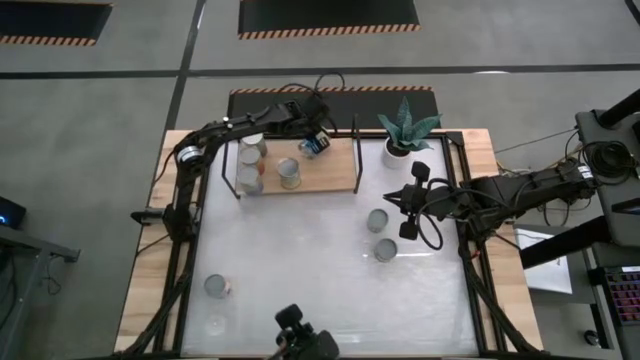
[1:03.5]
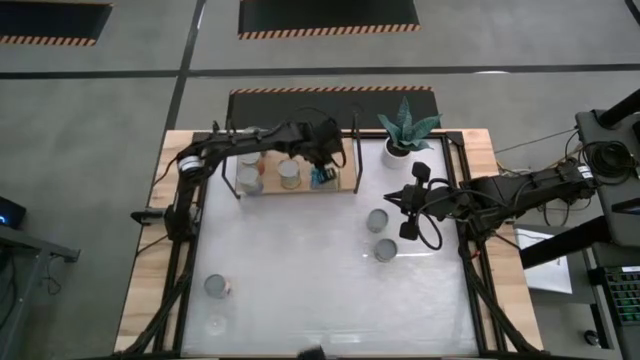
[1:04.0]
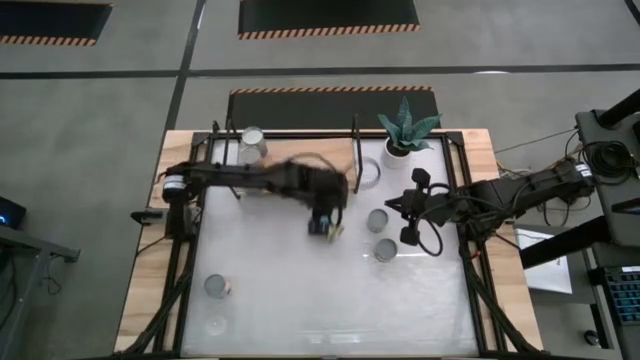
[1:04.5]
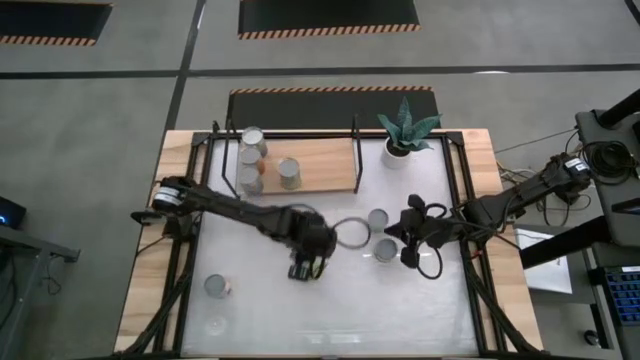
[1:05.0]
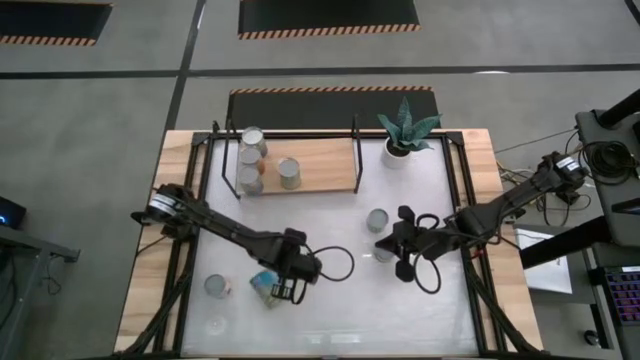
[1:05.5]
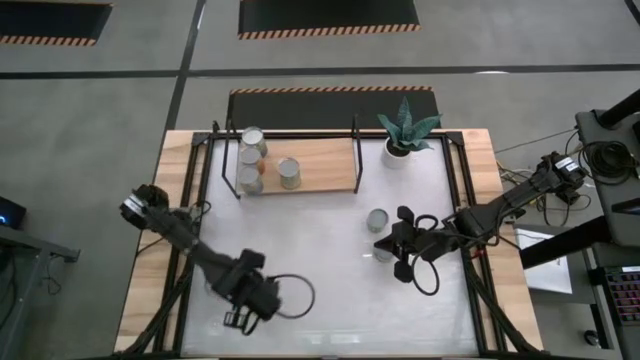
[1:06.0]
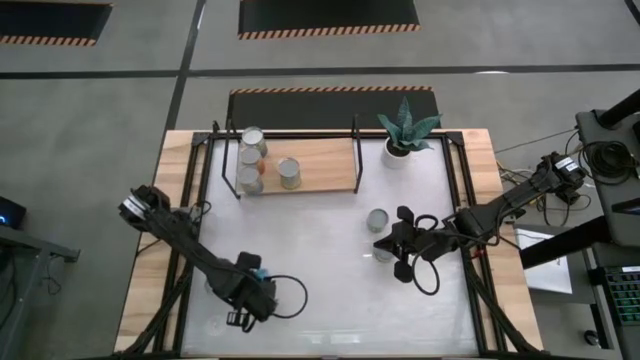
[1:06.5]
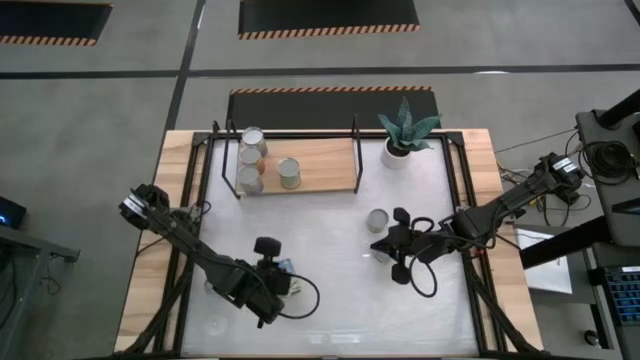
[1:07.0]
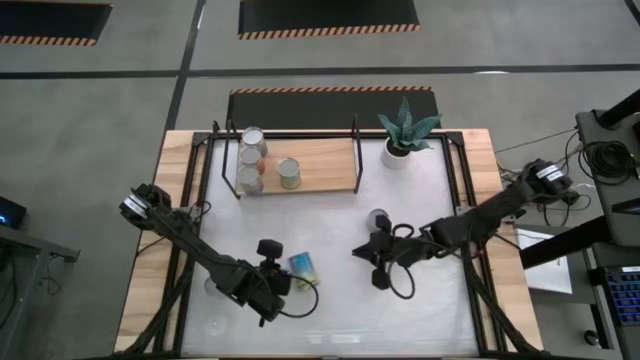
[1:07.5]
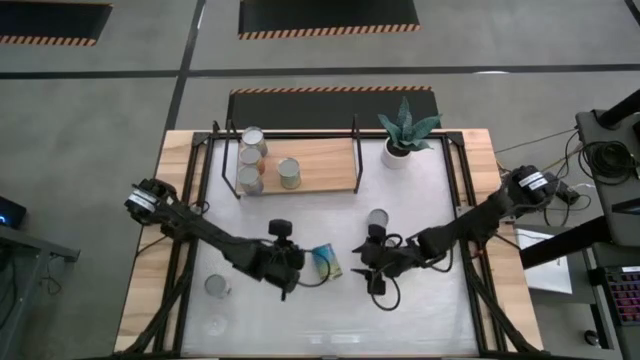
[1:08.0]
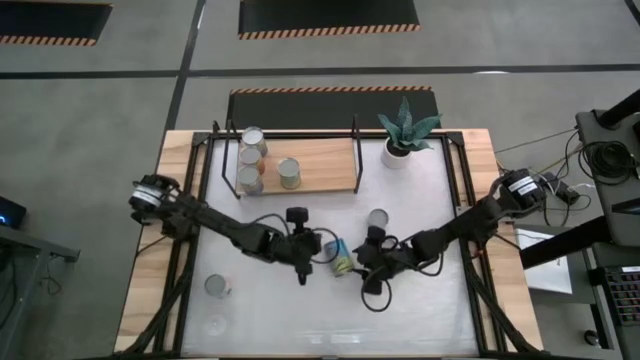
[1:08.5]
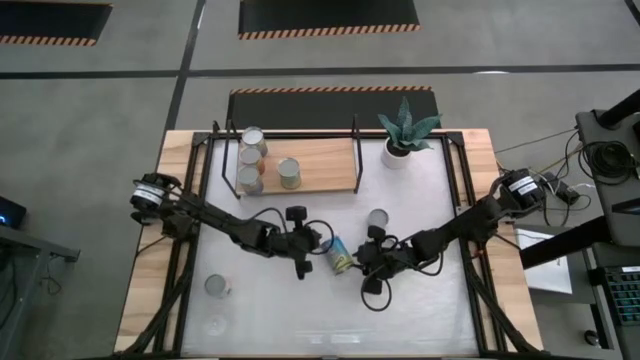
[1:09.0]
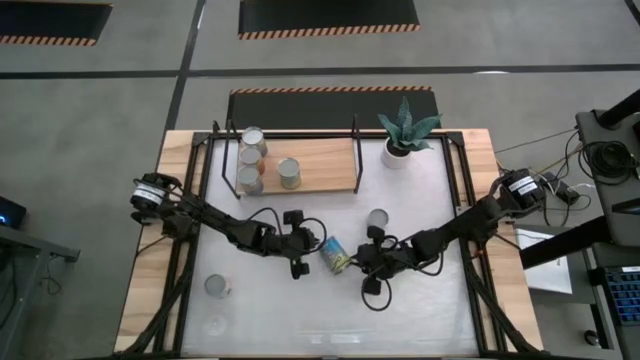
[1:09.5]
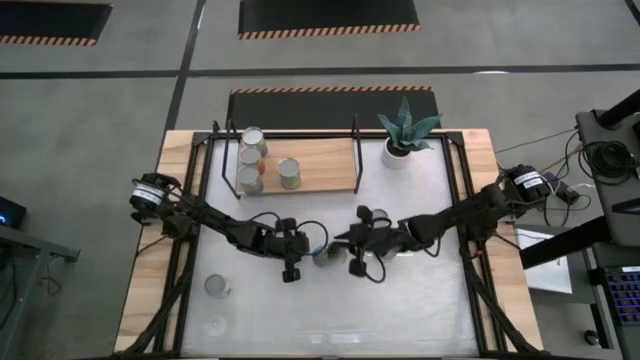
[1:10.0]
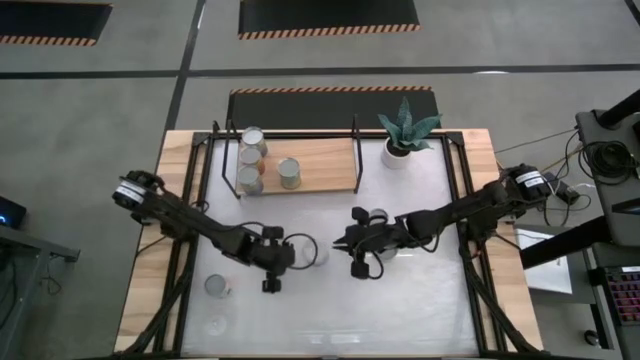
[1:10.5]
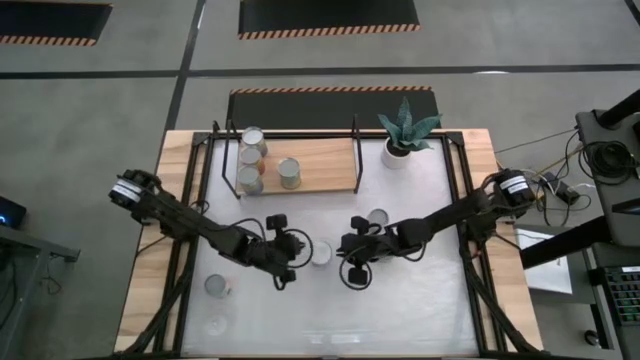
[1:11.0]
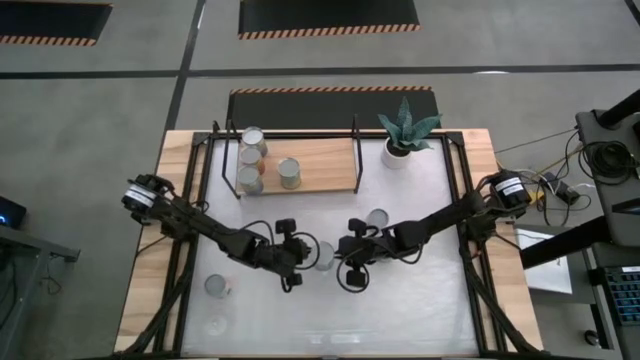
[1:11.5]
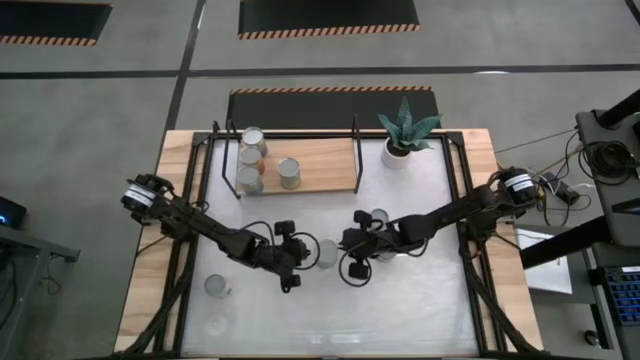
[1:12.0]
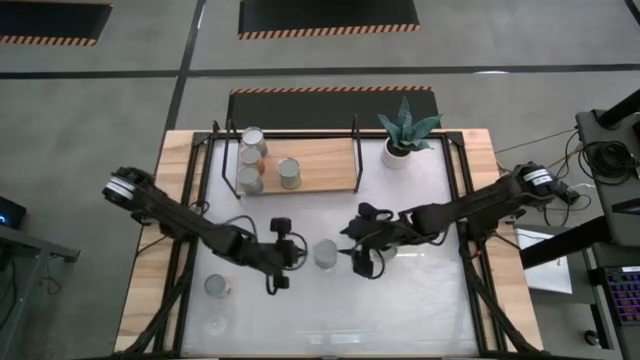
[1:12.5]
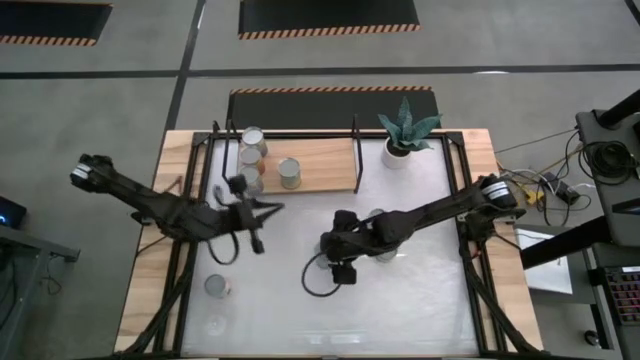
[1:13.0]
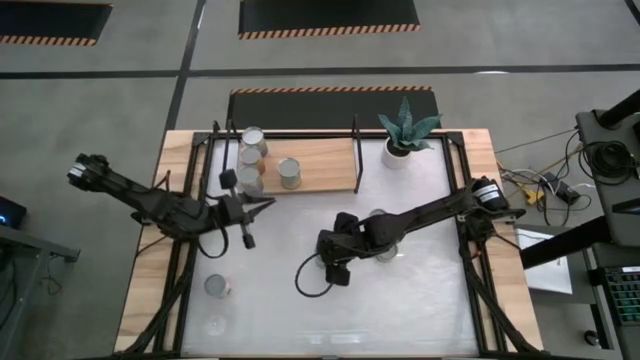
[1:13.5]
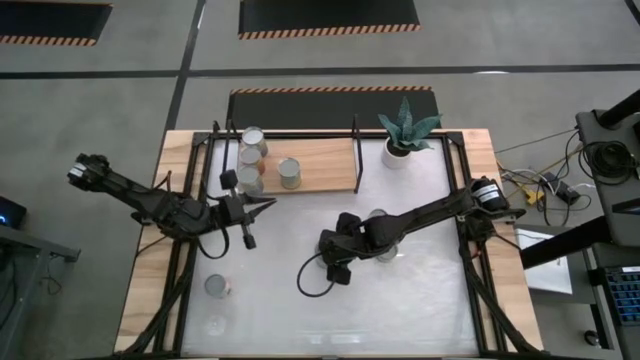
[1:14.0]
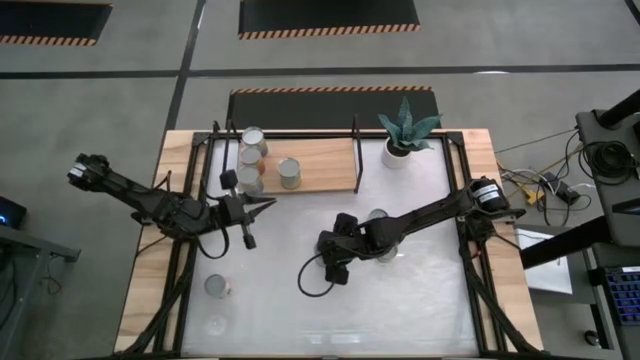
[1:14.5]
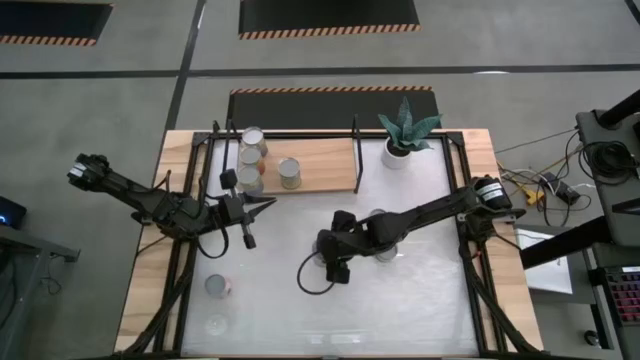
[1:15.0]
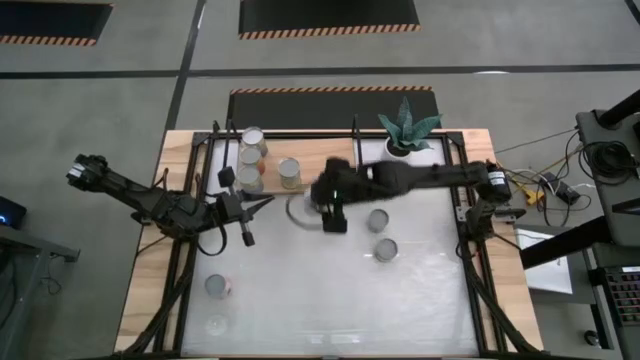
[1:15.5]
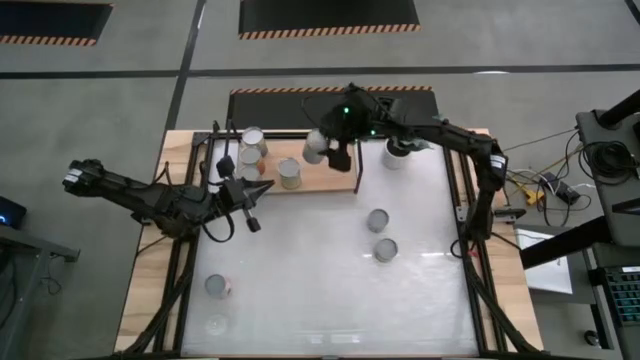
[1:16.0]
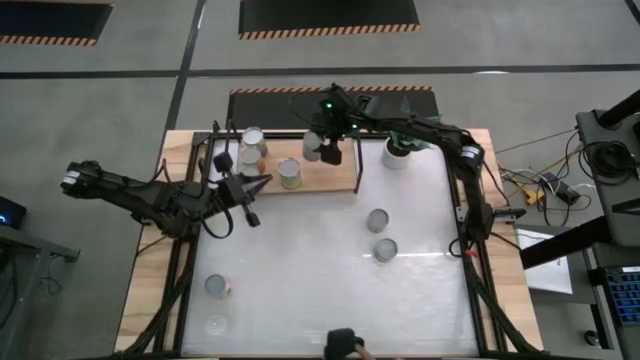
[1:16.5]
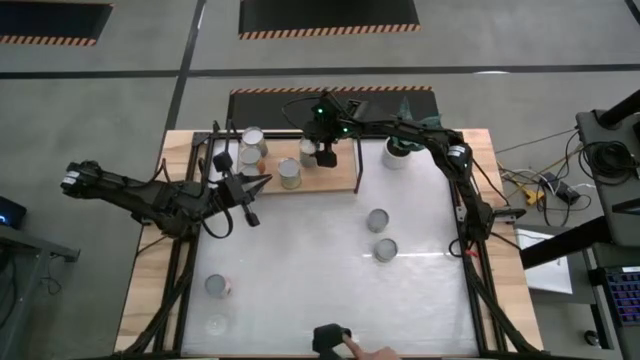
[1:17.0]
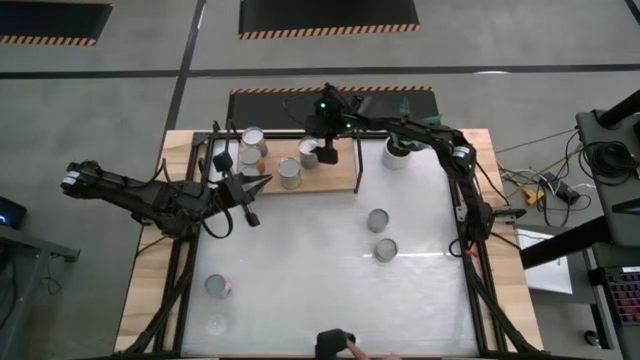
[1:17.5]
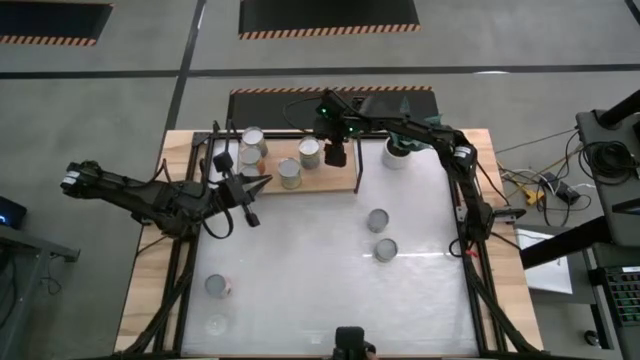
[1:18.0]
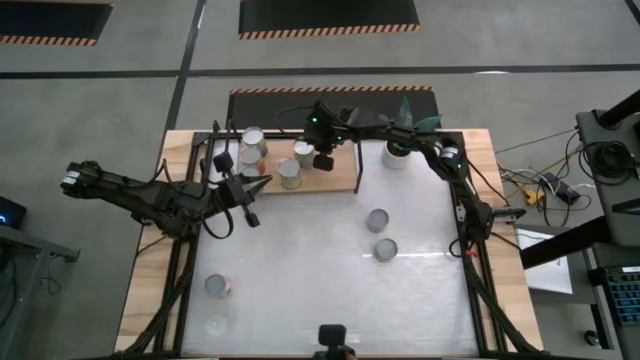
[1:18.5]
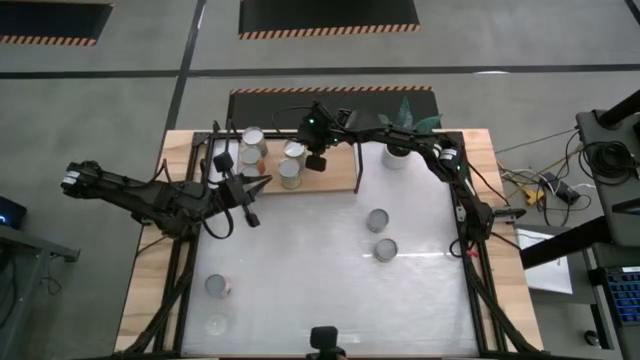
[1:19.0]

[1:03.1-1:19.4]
Task: Pick and place cans onto a shelf
Put the canned cherries on the shelf

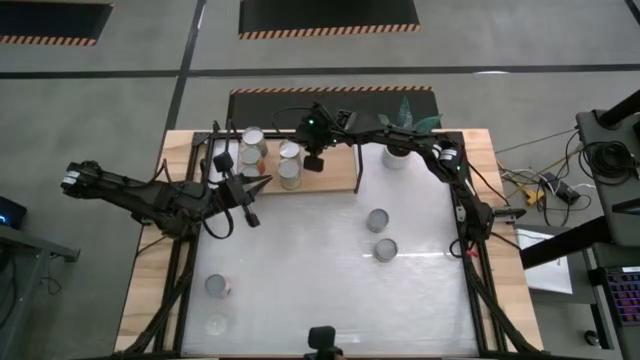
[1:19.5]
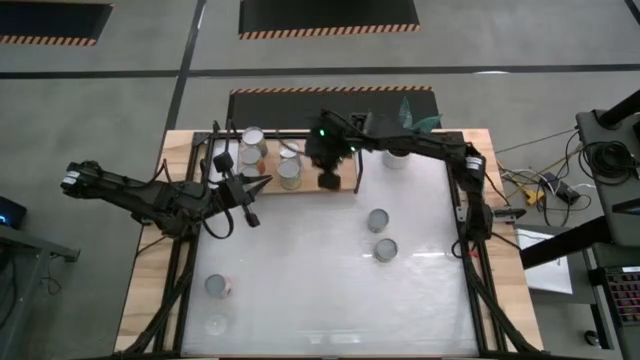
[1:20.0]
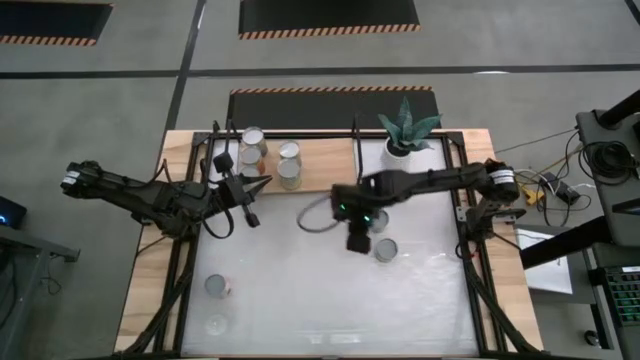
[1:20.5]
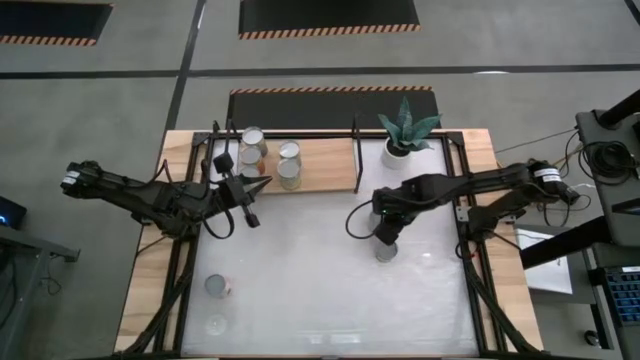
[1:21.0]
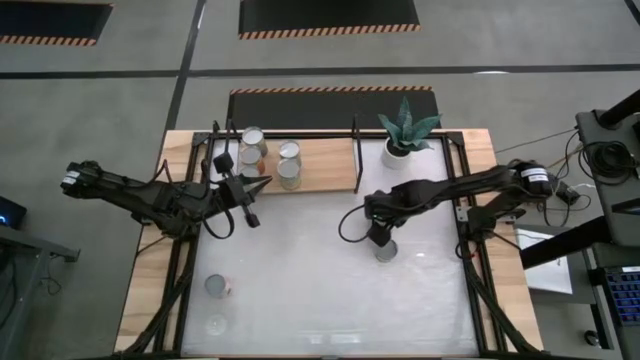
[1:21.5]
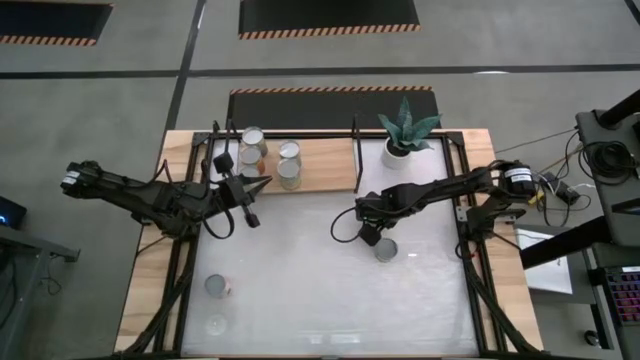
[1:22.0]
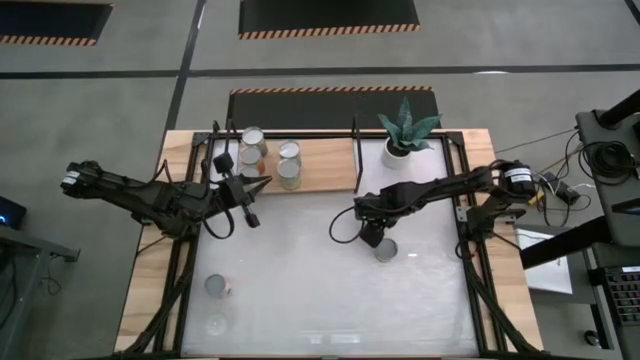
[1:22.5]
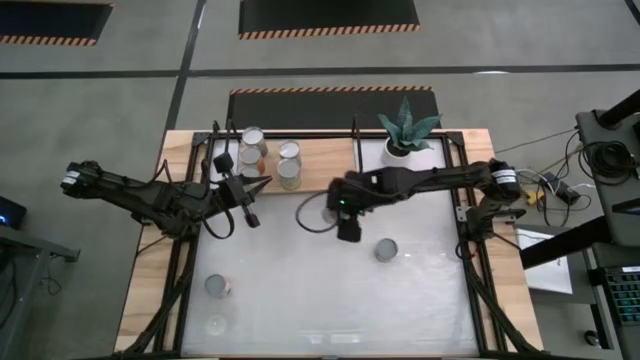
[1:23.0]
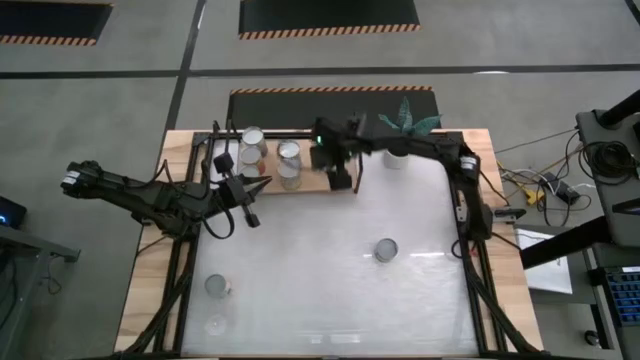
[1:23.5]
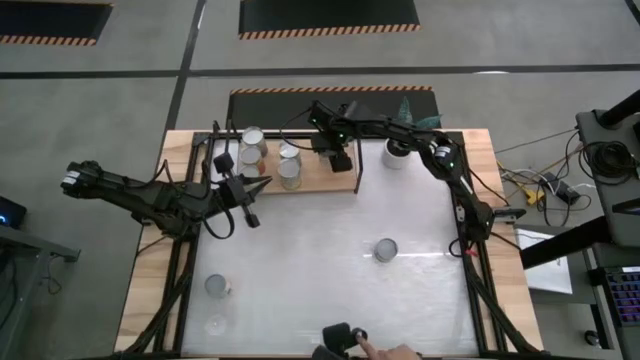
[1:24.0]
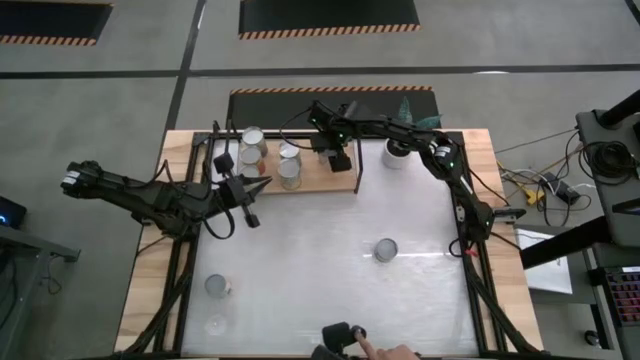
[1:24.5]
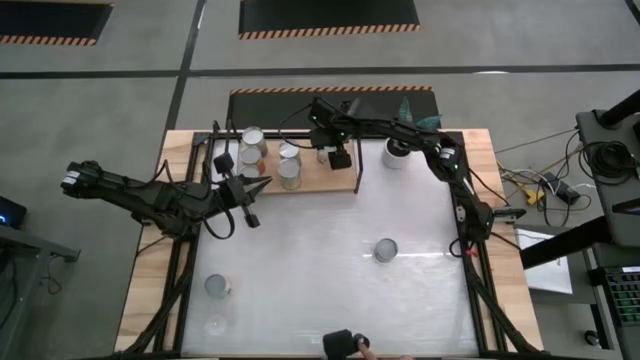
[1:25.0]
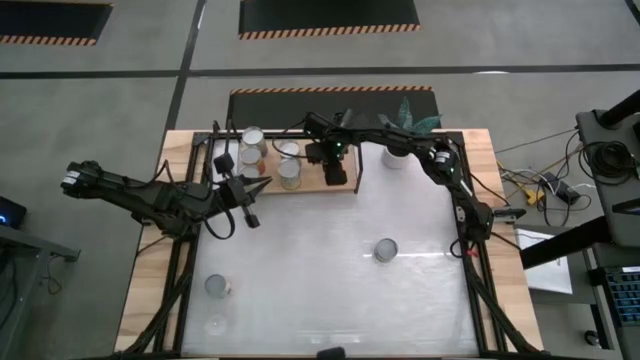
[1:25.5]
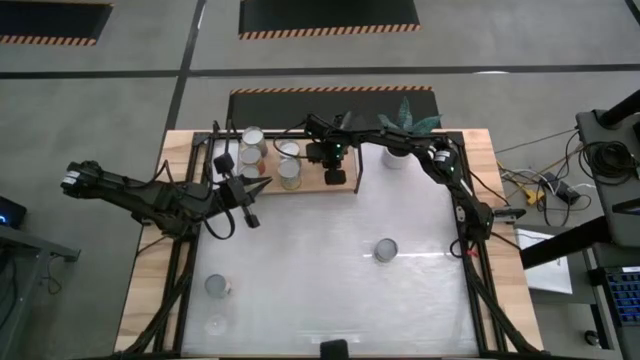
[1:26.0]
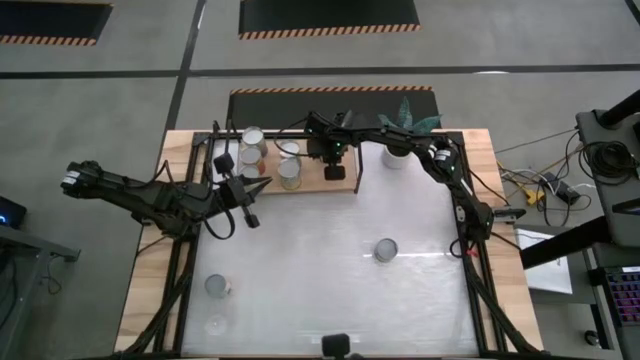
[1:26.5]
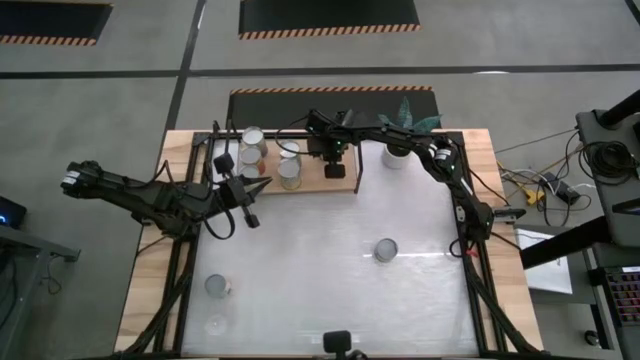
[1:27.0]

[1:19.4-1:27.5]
Put the small canned peas on the shelf
